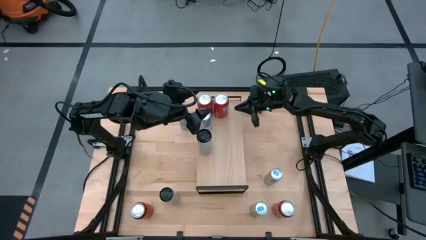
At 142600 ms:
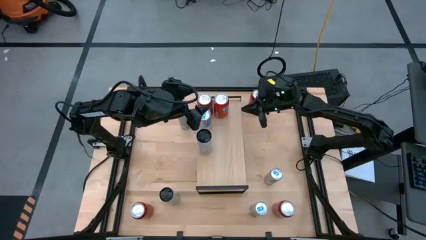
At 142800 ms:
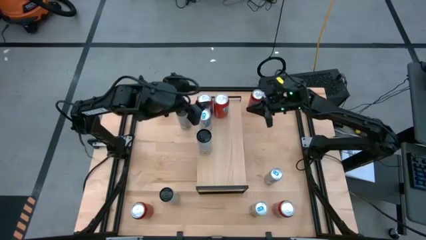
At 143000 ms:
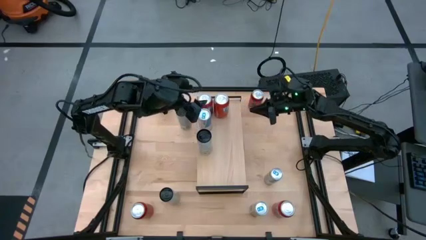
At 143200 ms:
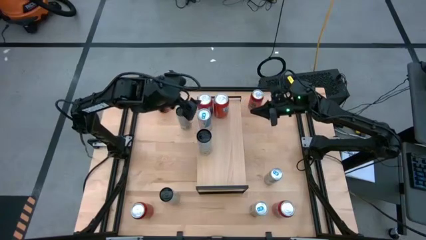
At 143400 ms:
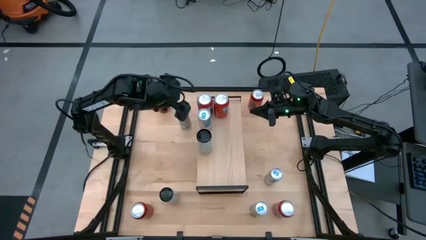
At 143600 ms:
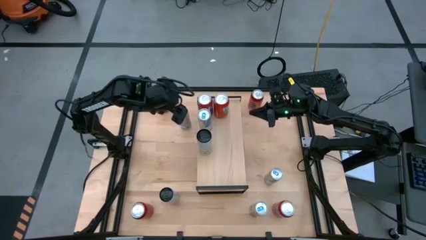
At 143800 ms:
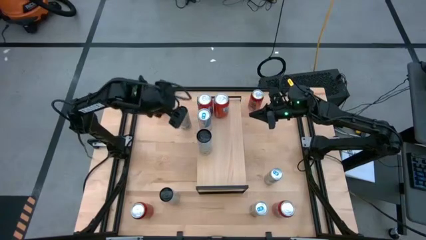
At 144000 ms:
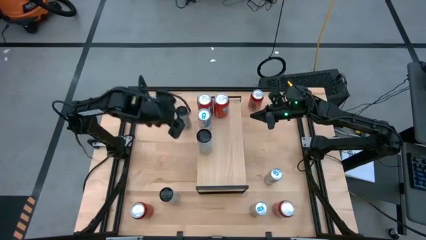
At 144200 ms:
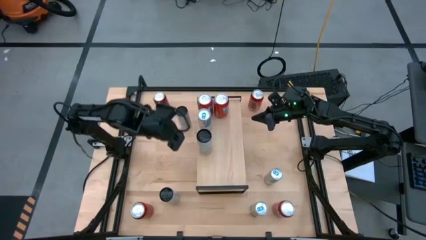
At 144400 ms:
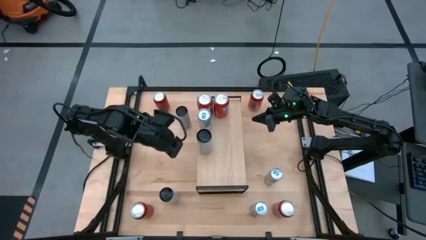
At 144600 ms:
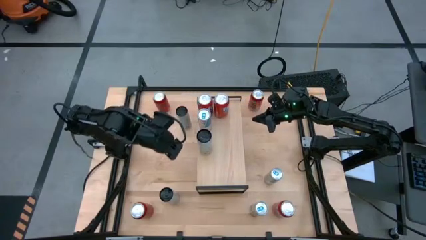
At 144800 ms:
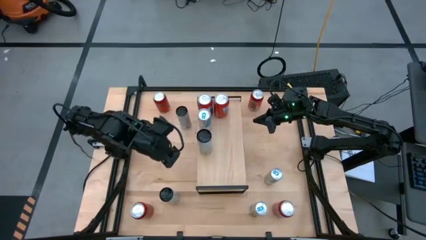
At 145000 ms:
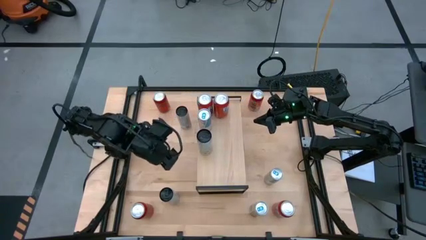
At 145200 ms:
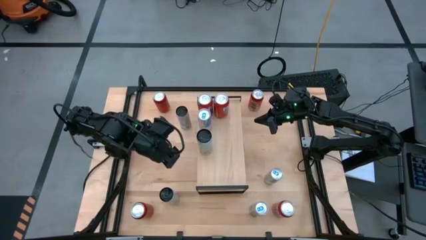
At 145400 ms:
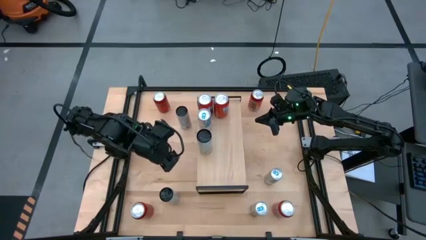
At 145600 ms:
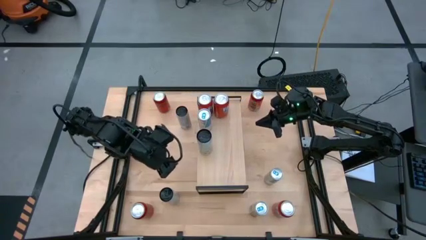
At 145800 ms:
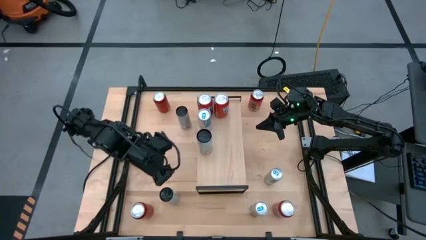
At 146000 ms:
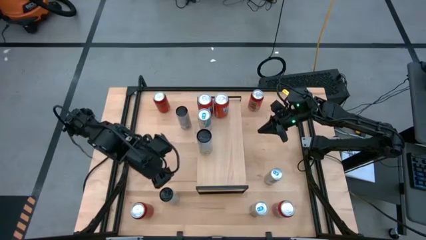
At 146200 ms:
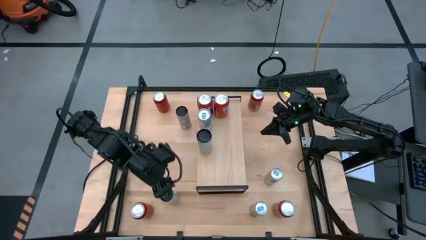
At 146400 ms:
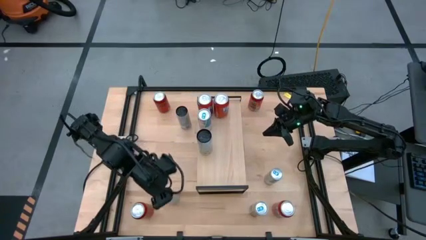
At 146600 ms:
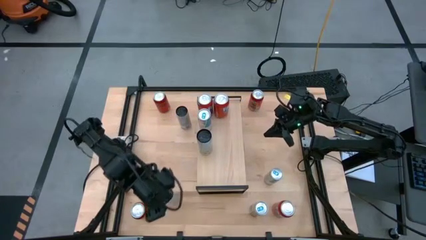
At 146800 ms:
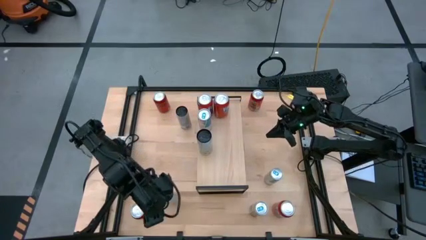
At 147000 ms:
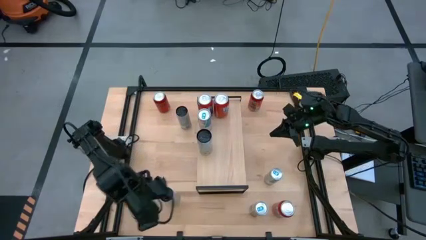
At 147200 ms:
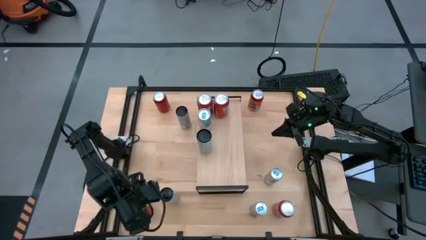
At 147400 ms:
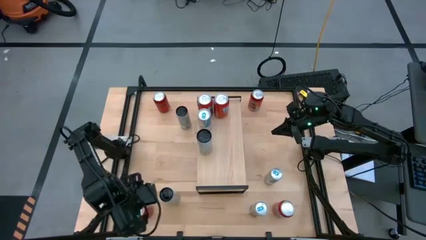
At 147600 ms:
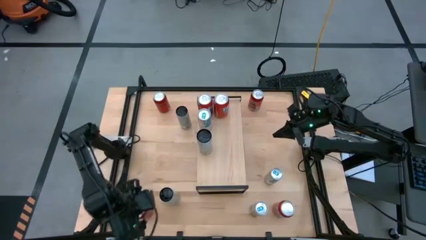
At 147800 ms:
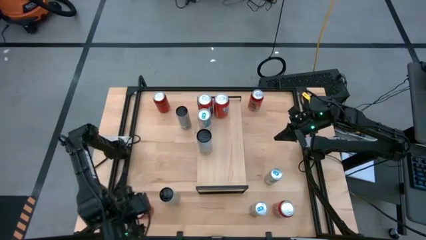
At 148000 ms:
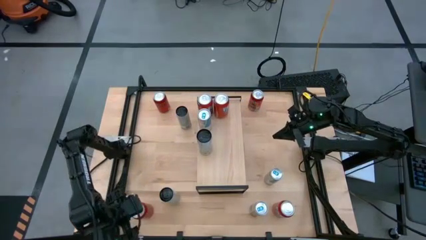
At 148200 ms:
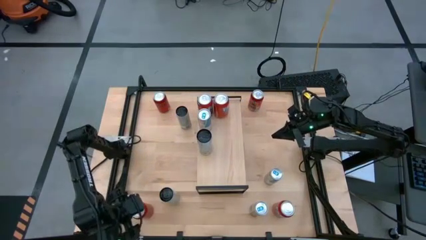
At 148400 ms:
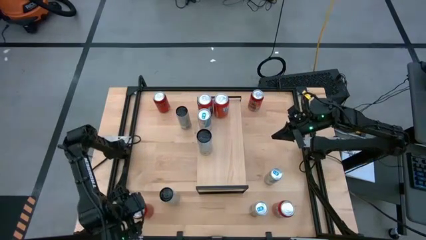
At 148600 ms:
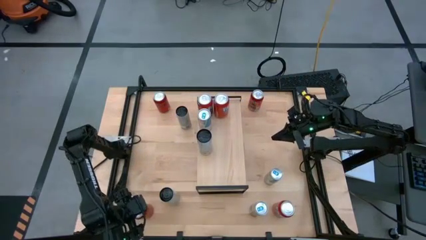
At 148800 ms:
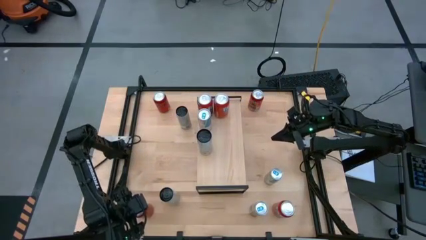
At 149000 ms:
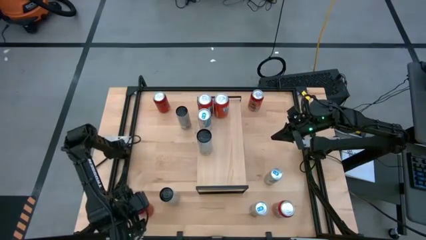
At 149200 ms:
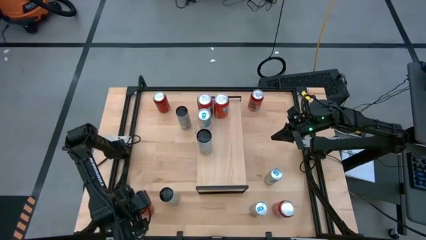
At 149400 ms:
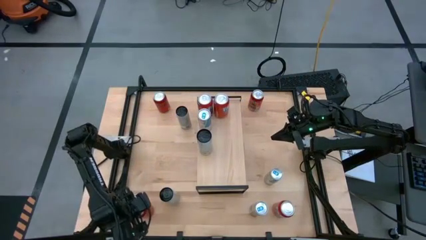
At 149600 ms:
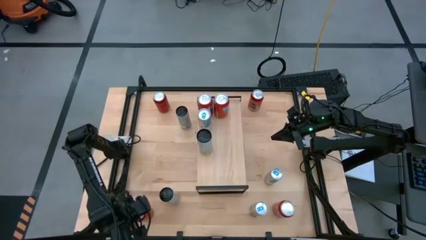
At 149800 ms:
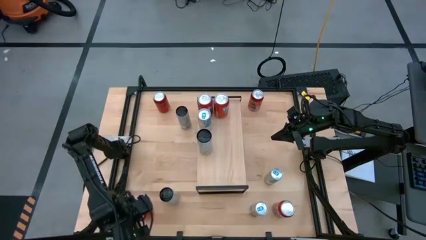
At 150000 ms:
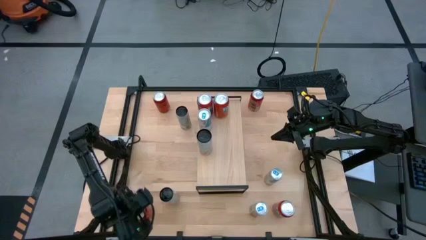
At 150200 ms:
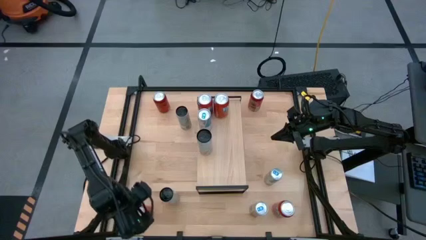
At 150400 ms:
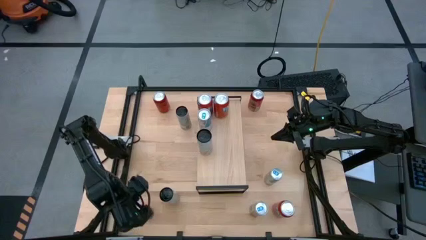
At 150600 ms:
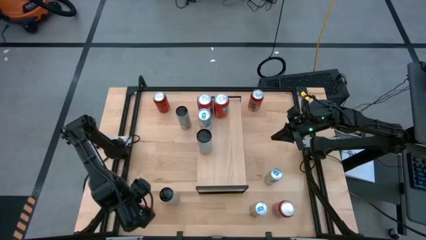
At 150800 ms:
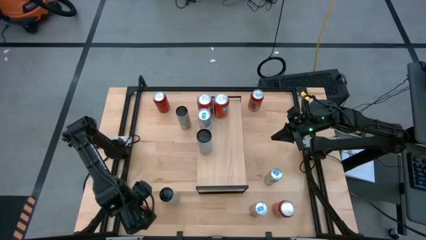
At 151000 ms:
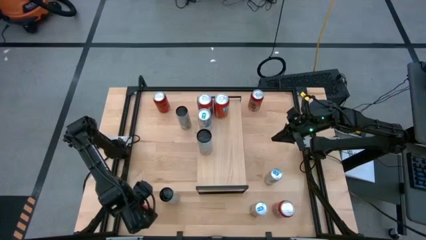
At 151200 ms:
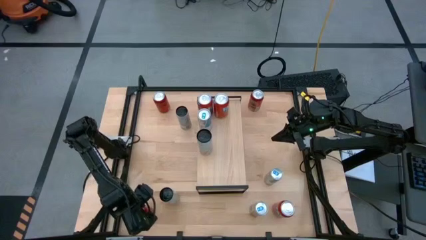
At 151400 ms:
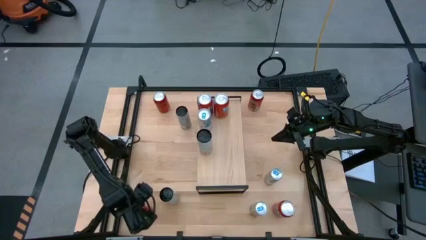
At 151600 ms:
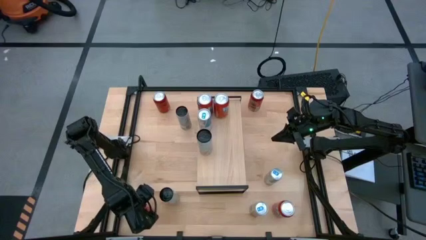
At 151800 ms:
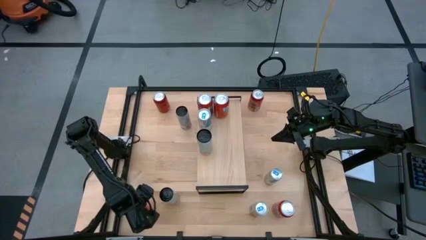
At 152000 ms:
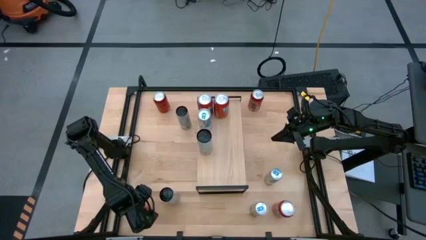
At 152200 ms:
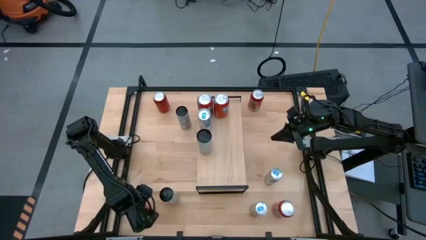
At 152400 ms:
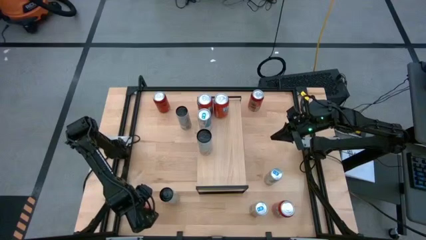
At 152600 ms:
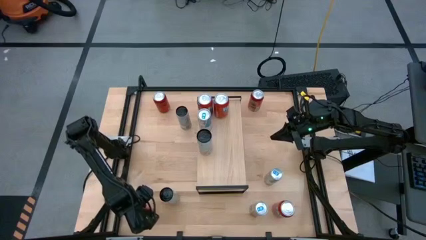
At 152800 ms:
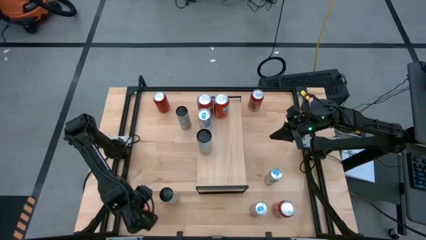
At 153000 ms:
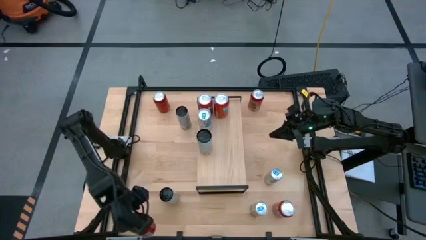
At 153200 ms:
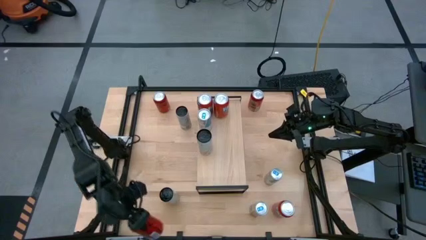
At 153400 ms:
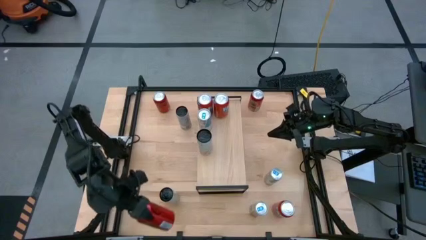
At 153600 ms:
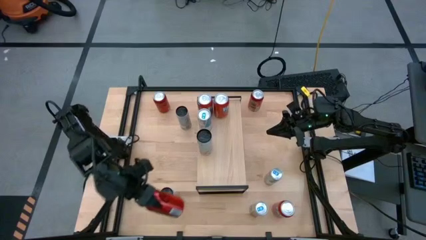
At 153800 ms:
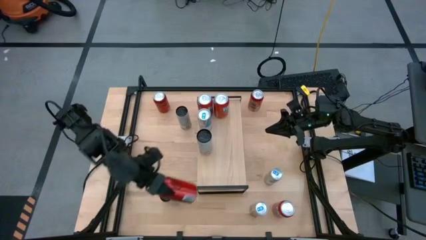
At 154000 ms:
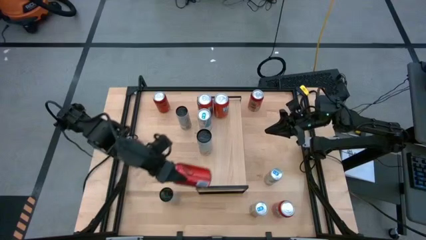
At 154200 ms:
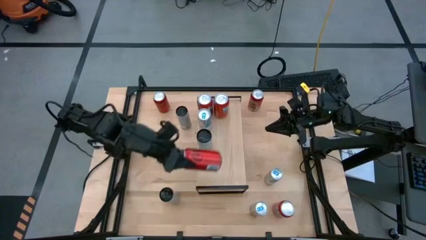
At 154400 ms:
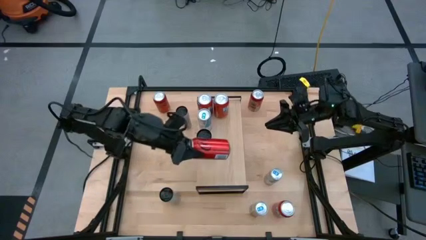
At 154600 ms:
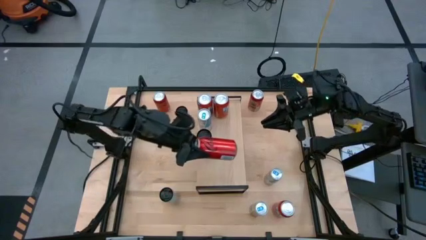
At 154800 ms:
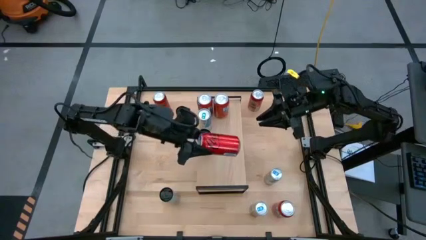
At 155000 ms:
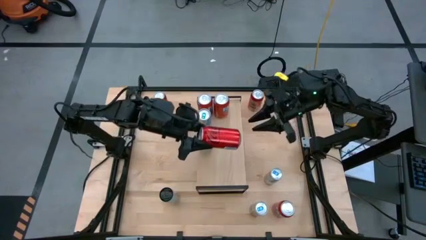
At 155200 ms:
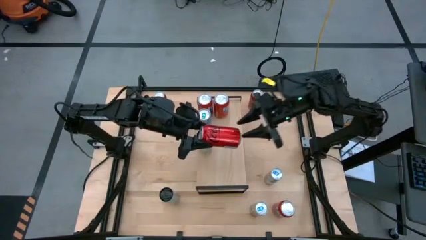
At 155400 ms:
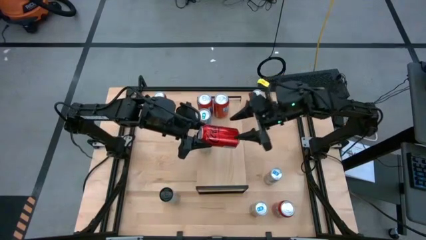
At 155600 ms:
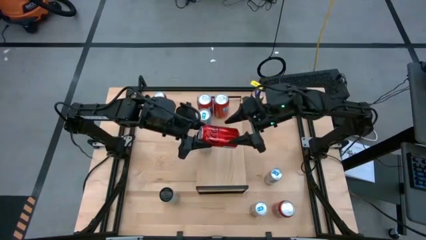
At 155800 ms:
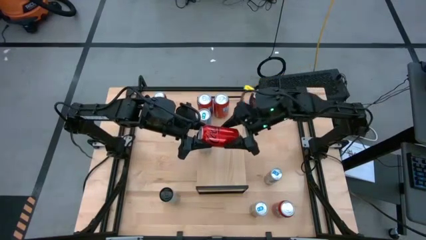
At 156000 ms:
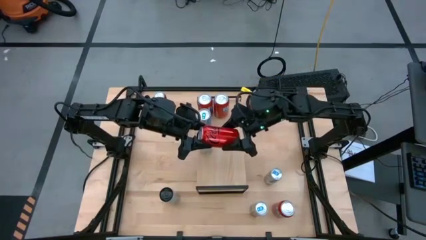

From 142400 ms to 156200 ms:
Task: Place canned beverage on shelf
Put the bottom left red soda can on the shelf
